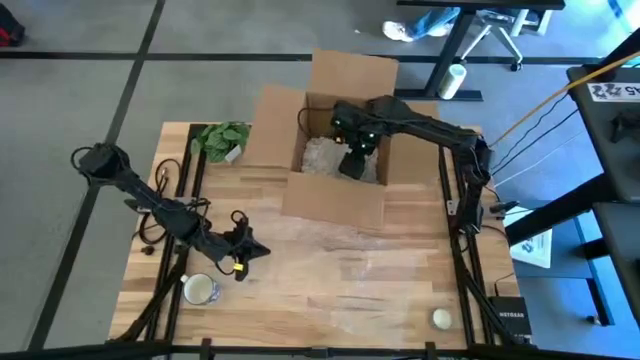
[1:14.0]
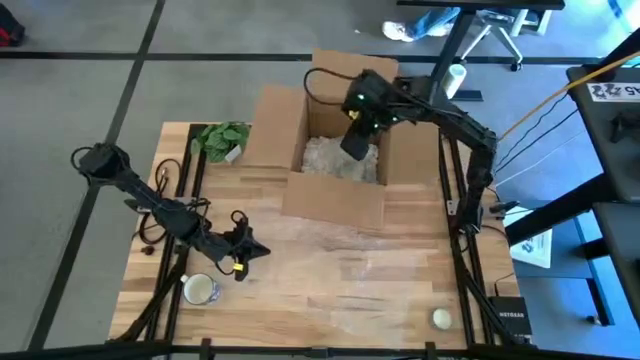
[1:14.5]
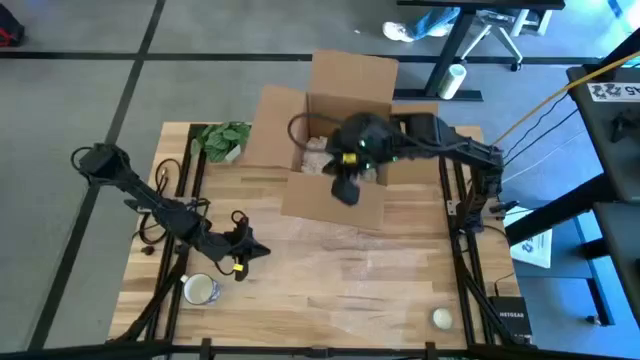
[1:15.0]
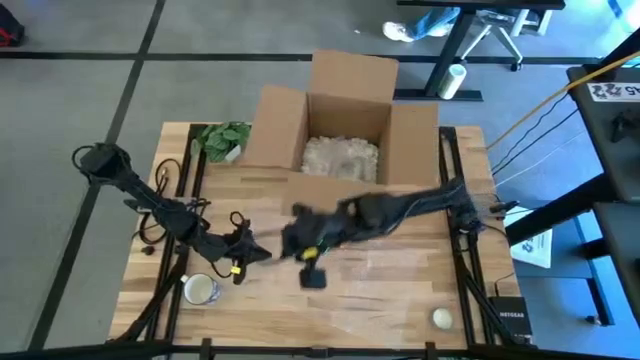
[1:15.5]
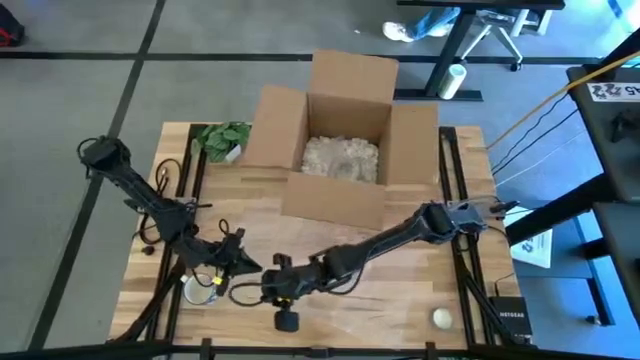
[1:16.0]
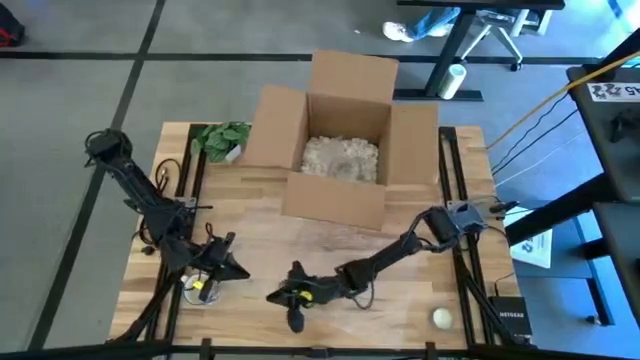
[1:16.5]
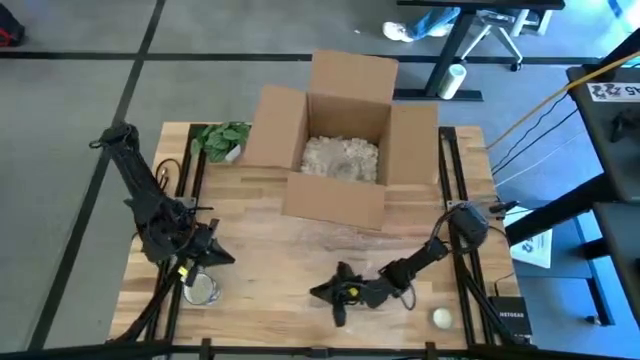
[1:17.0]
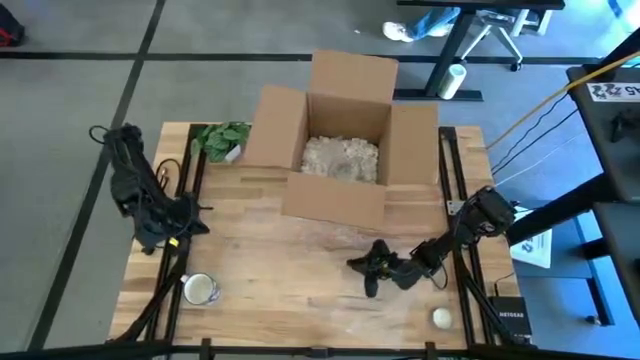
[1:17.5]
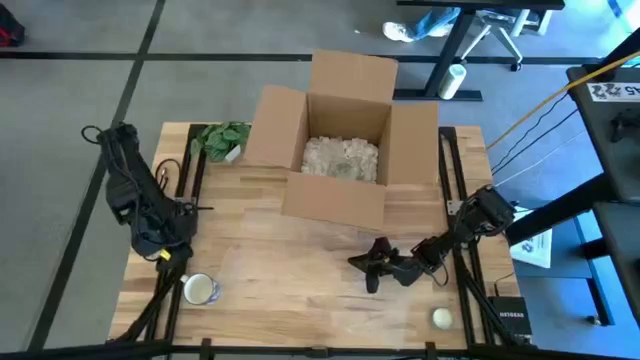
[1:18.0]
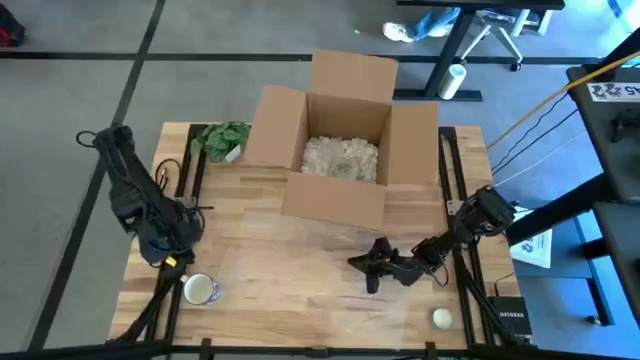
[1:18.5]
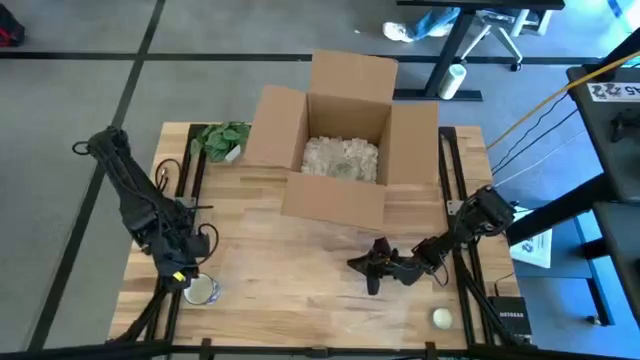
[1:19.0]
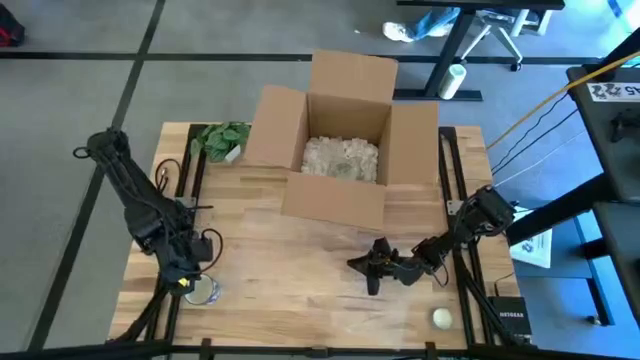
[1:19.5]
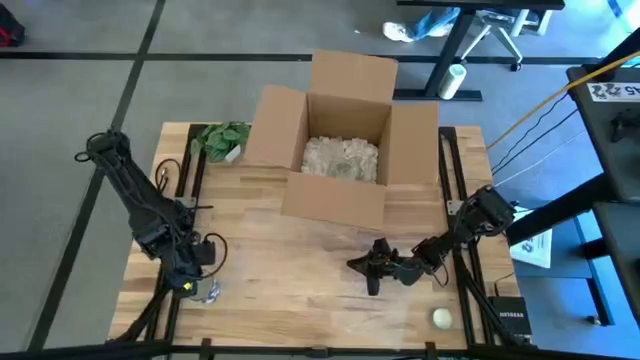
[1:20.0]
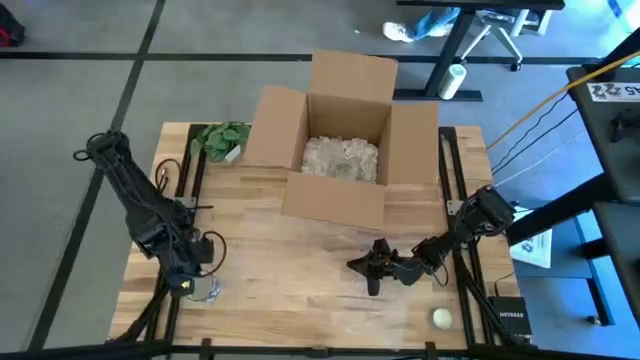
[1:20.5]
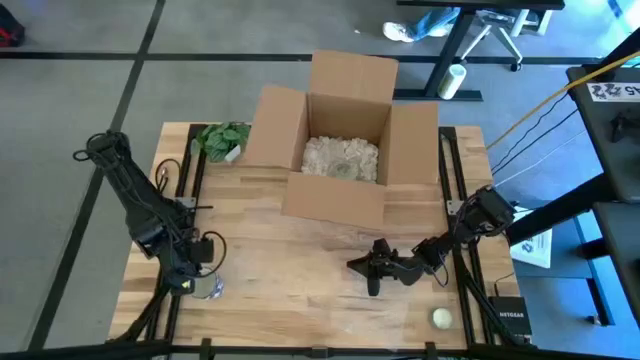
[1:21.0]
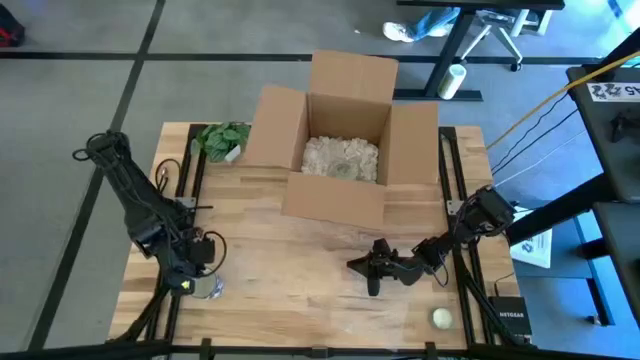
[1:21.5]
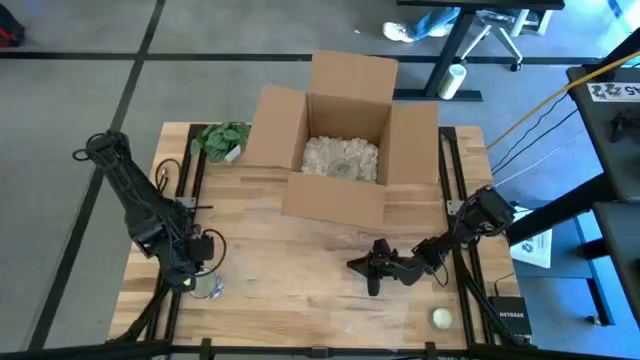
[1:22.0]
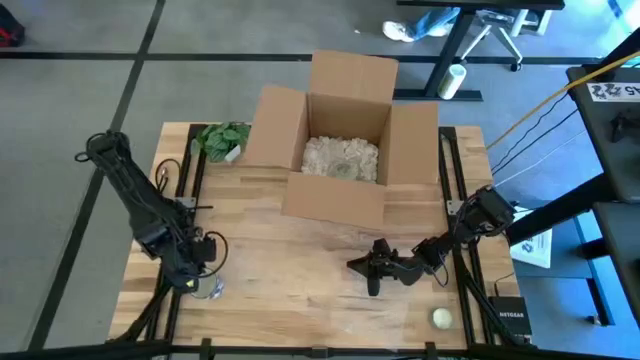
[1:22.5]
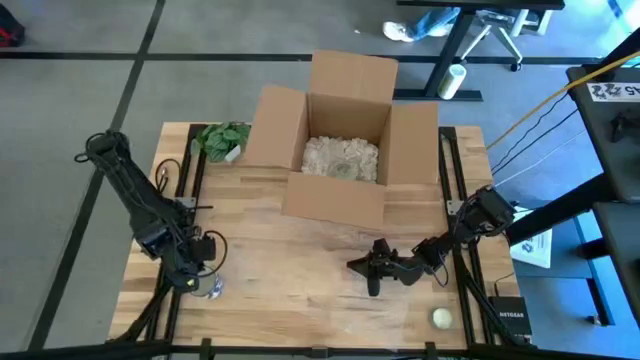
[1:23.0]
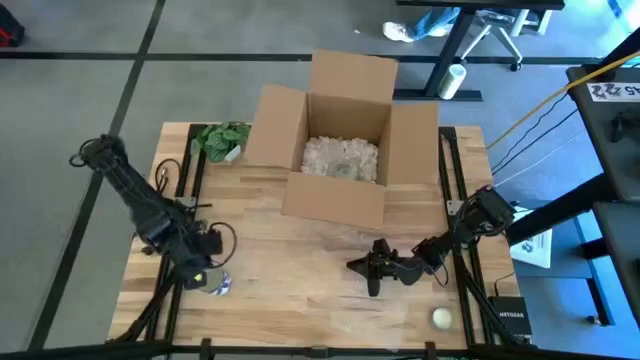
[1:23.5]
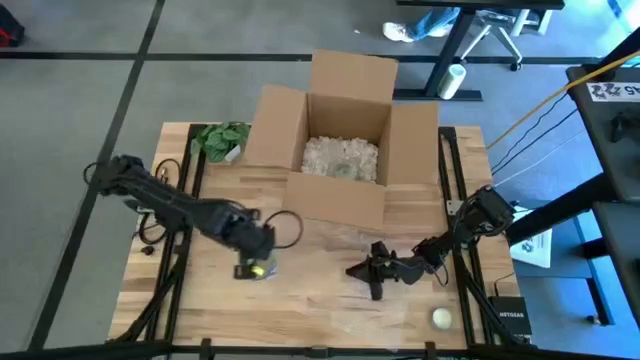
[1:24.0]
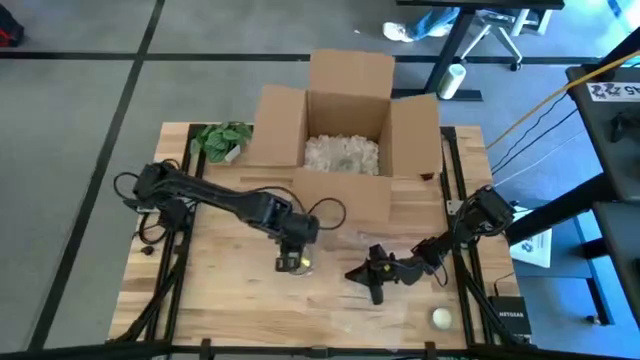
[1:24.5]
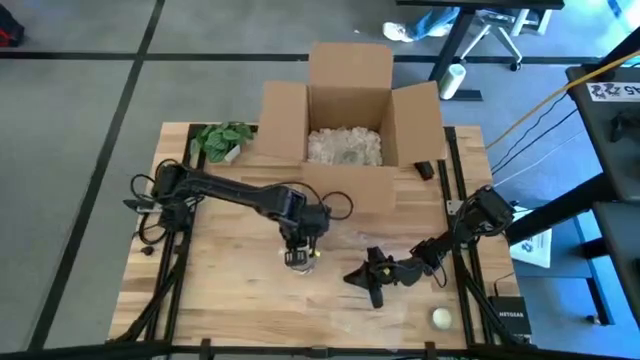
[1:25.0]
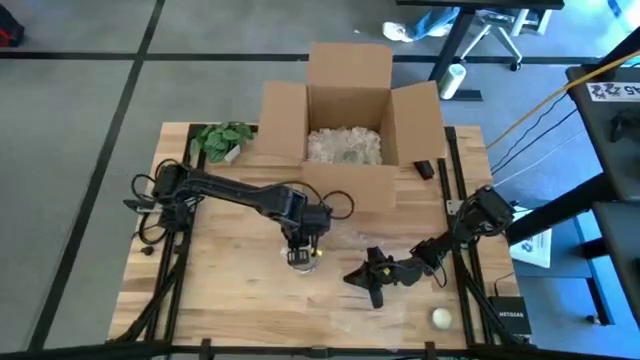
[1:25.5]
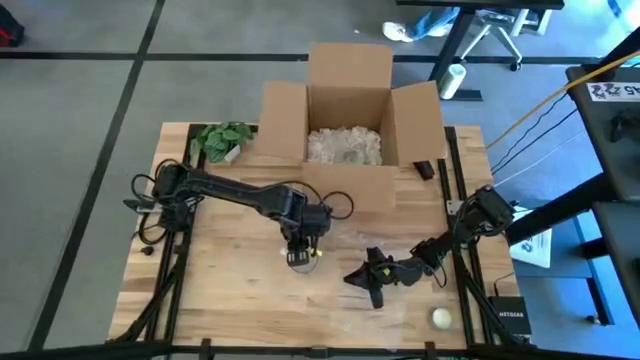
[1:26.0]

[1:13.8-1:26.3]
Task: wrap mug
Put the blue mug on the bubble wrap
